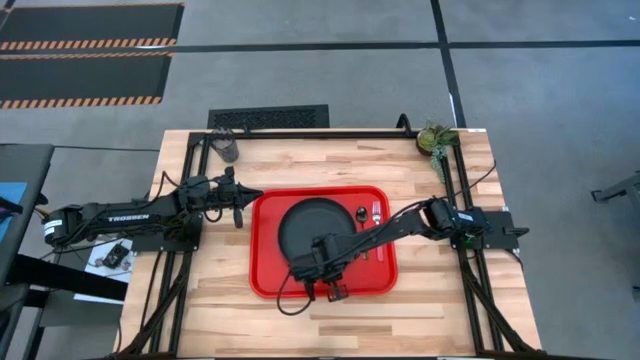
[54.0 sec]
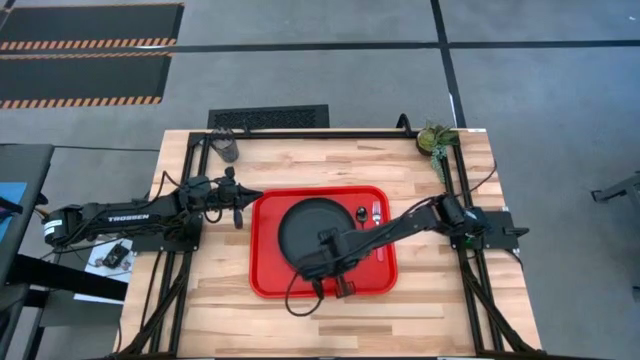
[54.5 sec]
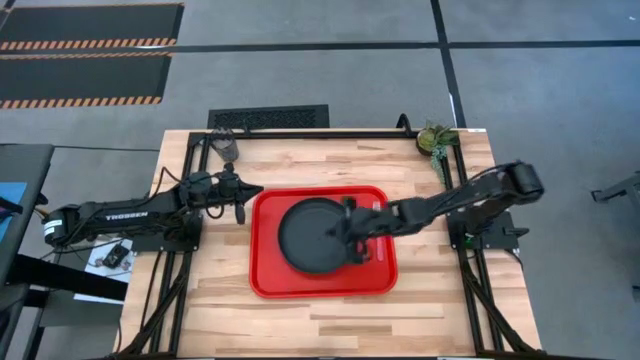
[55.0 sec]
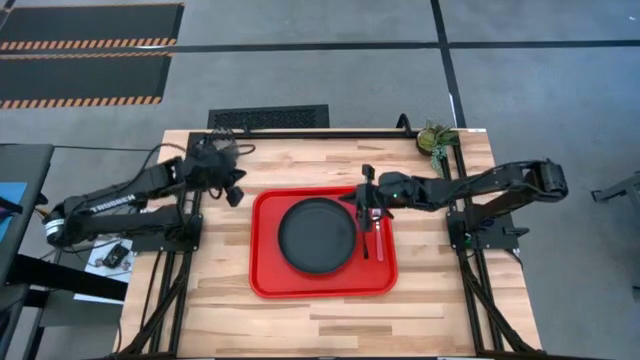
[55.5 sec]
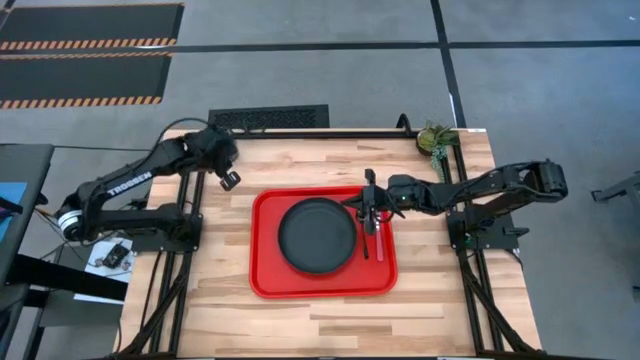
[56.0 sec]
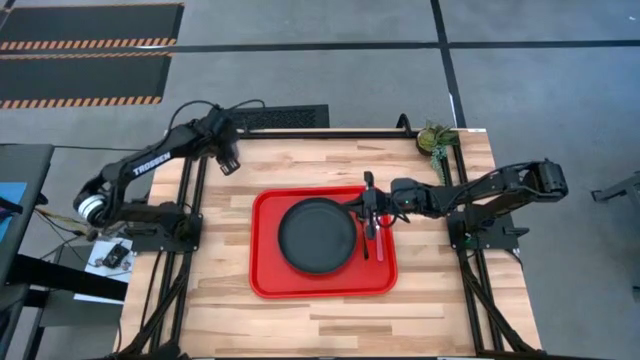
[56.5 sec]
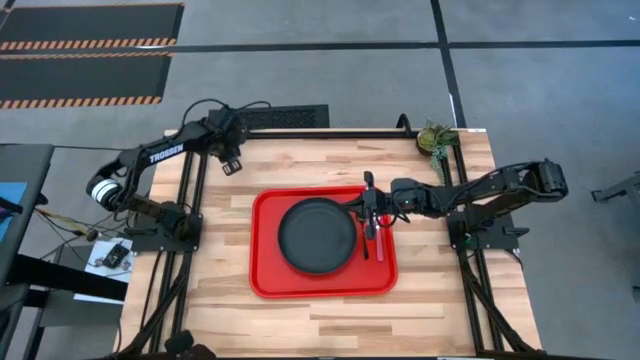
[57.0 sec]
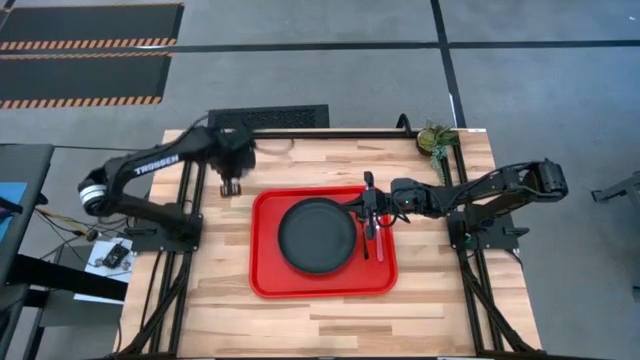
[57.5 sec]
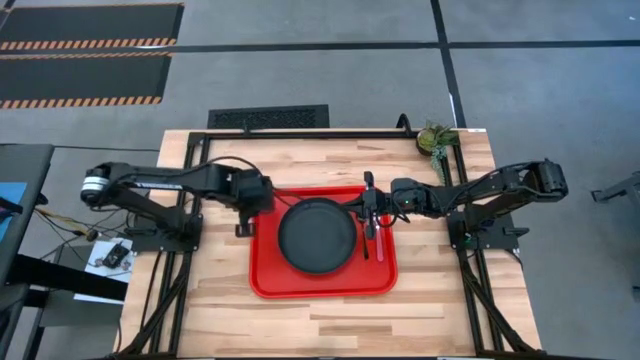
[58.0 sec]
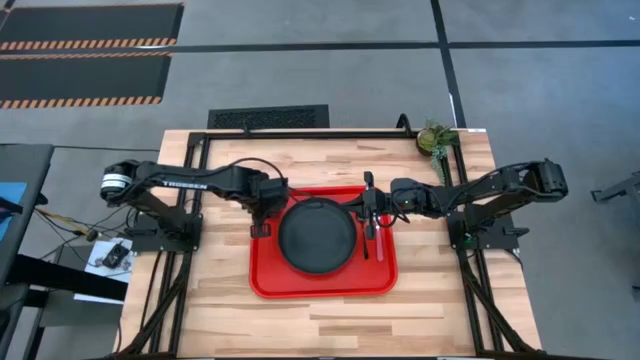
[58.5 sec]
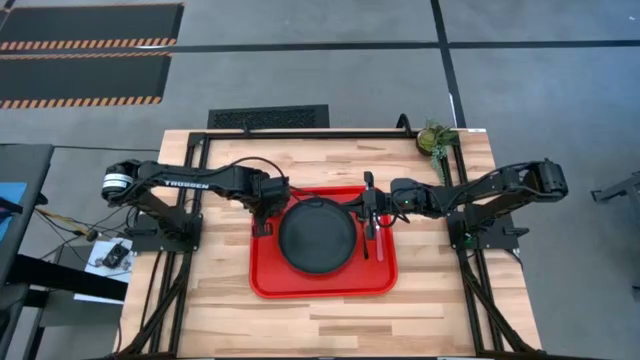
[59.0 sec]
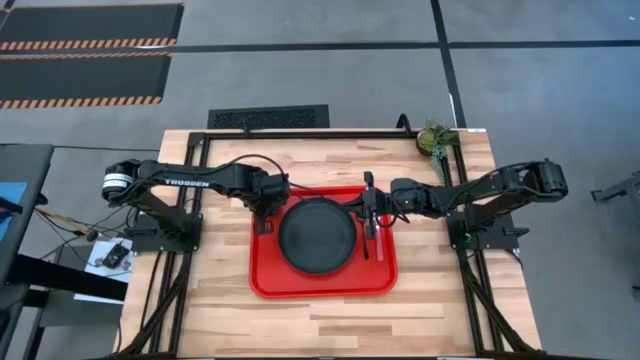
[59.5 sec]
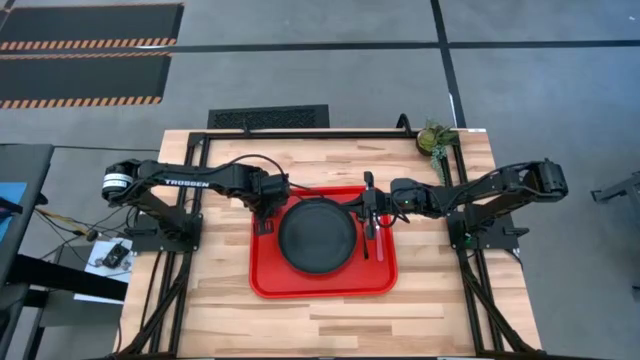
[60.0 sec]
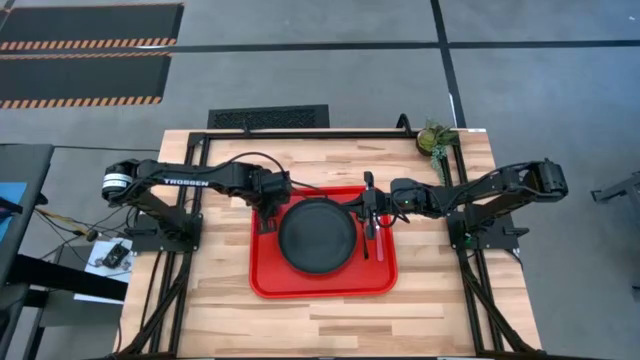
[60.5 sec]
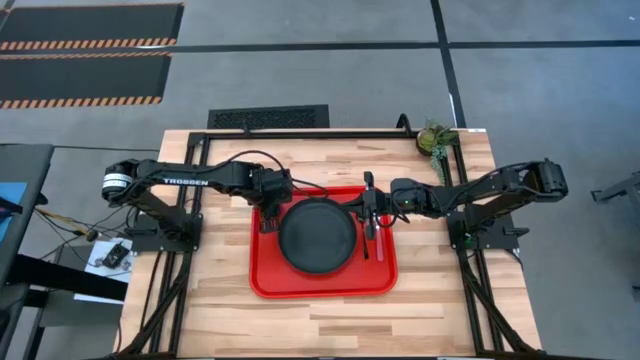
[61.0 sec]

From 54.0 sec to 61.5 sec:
Task: Pick and place plate/cup/fork/spoon on tray
Put the blue cup at the top left of the black plate on the red tray

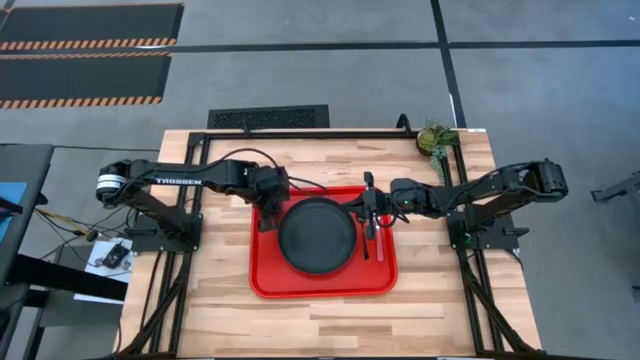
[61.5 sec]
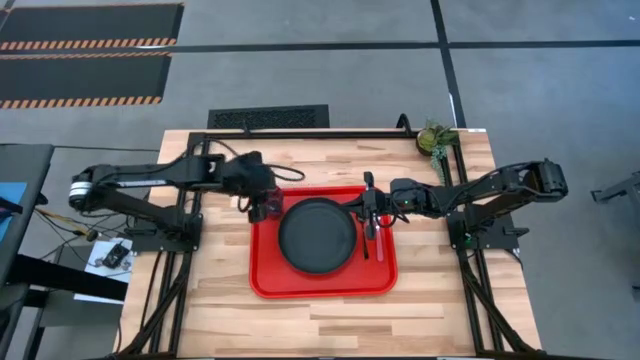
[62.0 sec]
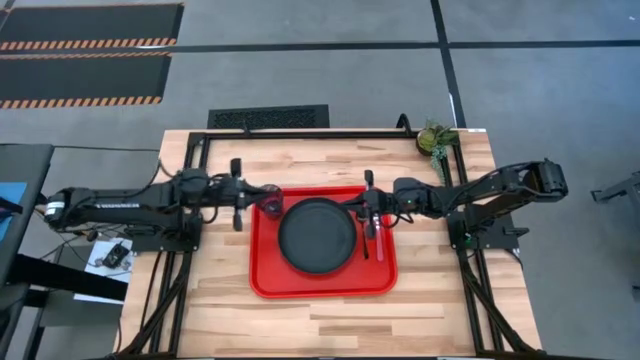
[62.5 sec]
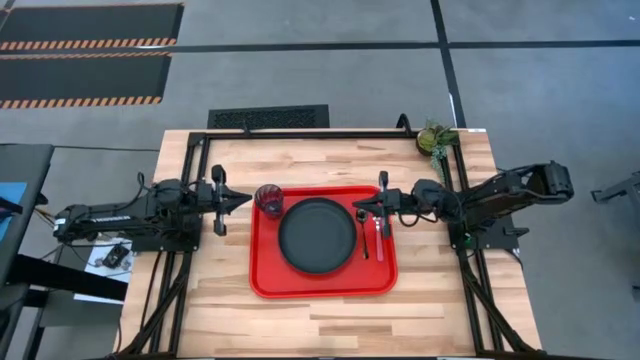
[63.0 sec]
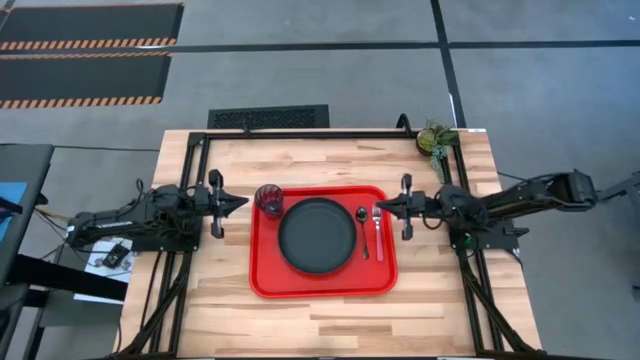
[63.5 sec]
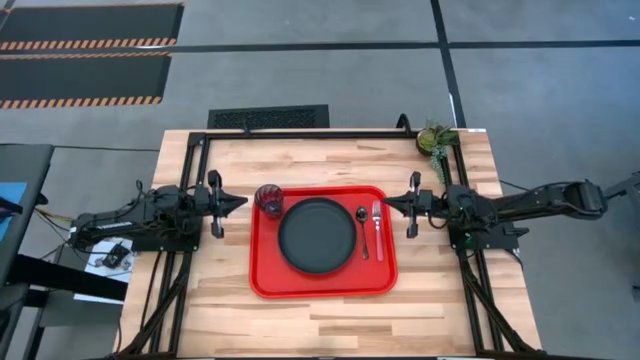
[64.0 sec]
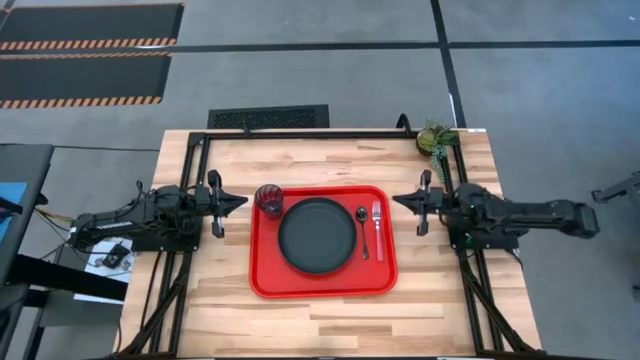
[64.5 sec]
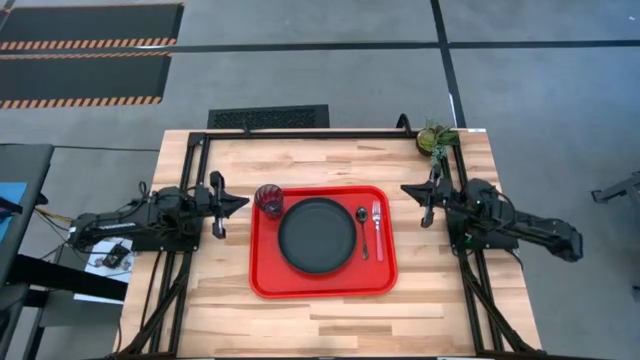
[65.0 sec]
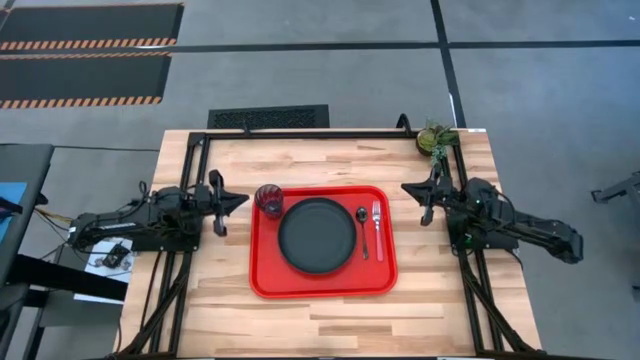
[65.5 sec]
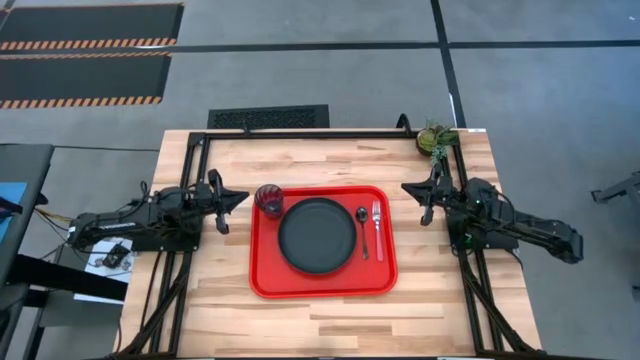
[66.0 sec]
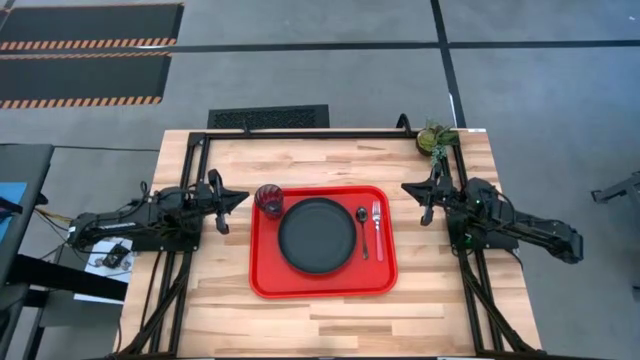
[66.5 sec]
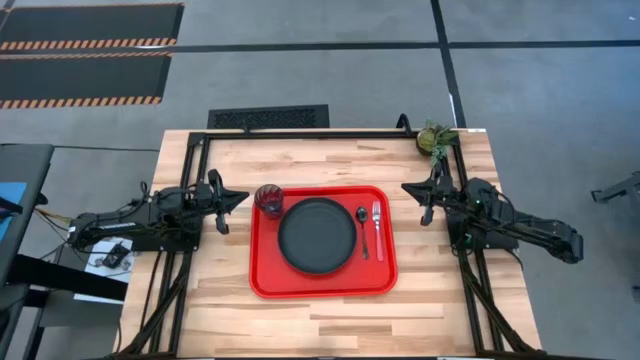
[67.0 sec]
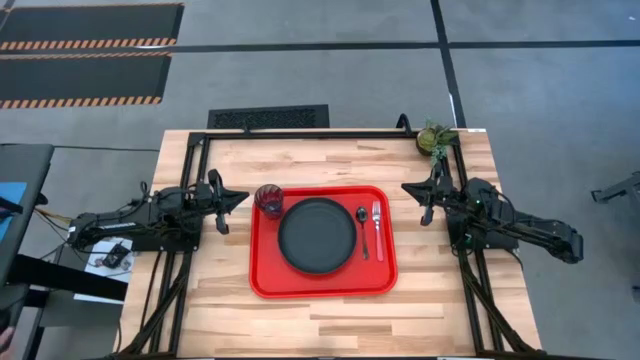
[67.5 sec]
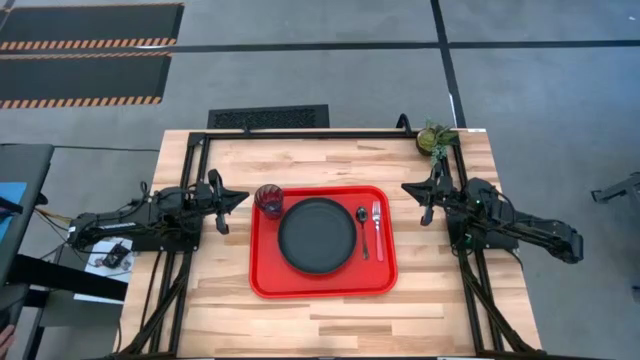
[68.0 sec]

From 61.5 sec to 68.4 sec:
Return to Home Position

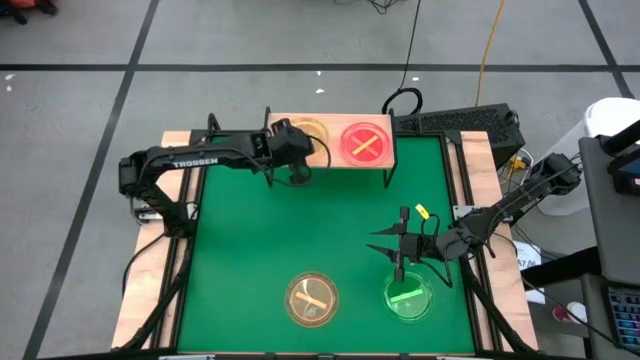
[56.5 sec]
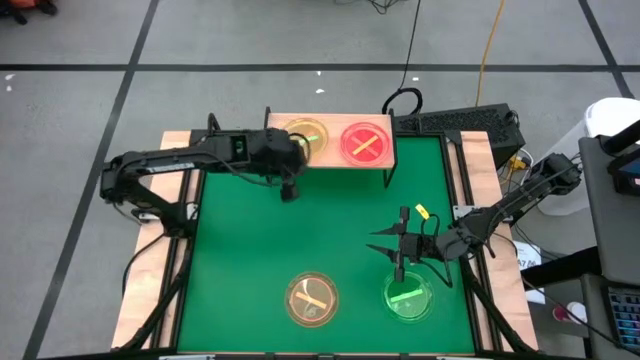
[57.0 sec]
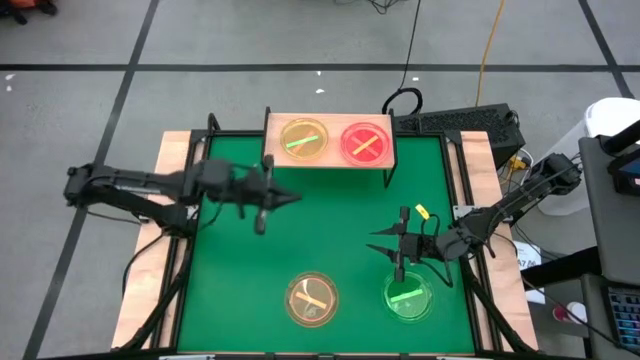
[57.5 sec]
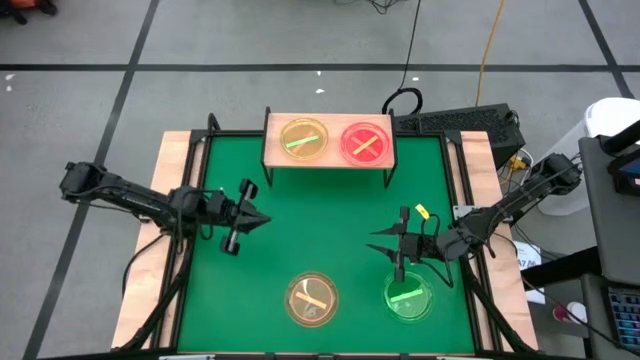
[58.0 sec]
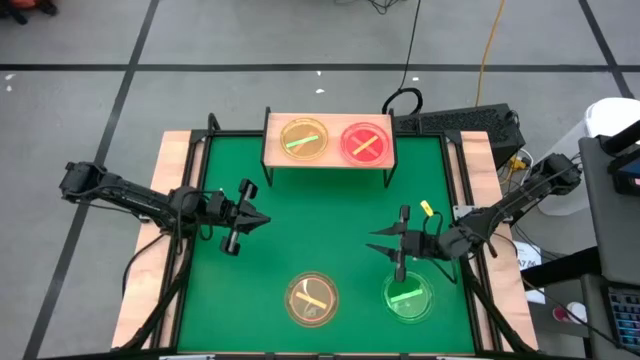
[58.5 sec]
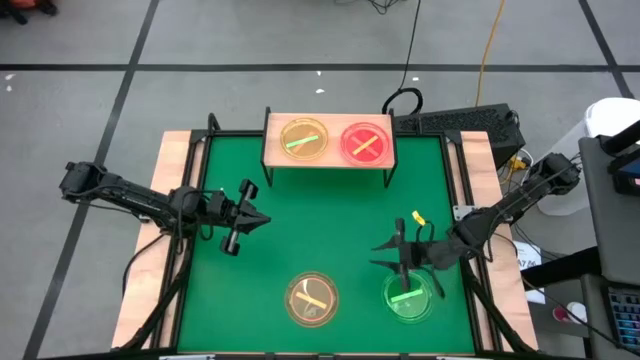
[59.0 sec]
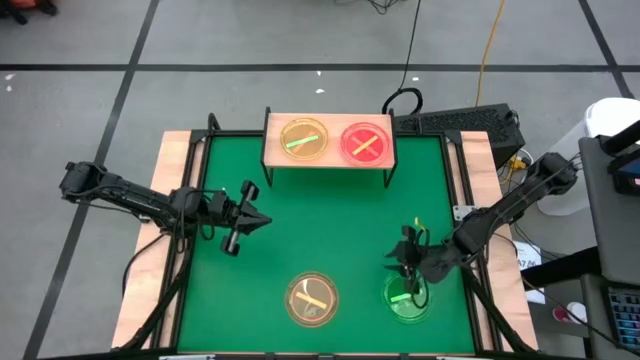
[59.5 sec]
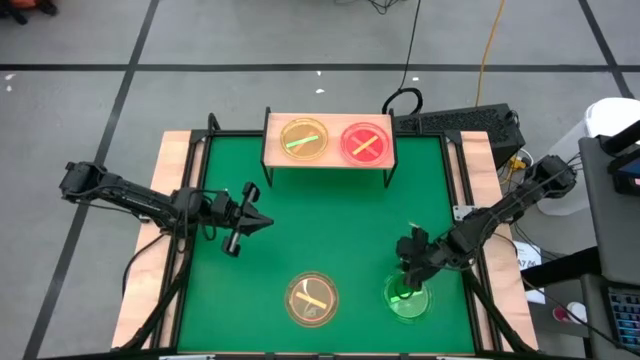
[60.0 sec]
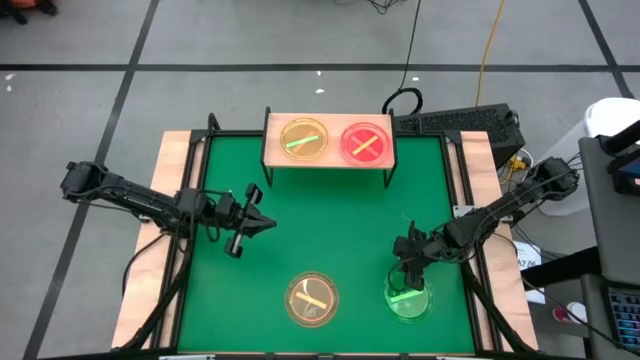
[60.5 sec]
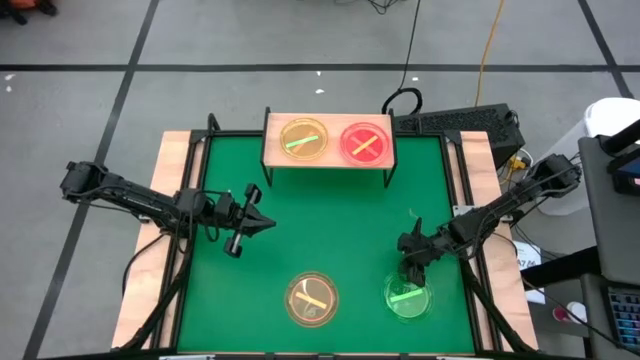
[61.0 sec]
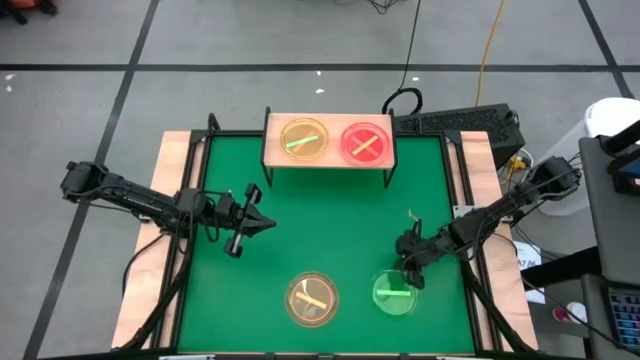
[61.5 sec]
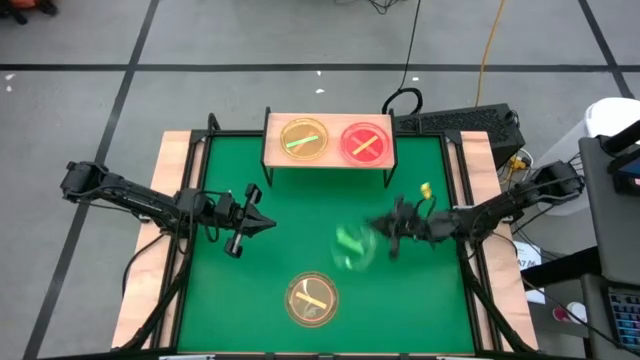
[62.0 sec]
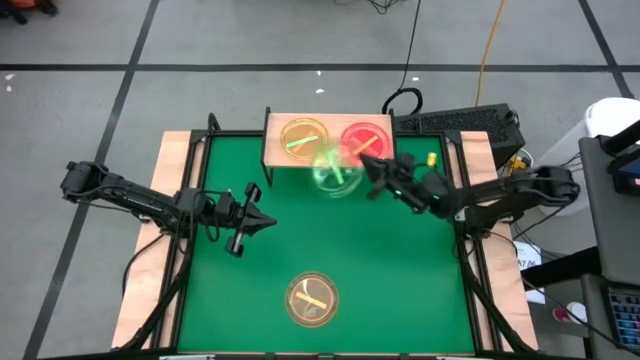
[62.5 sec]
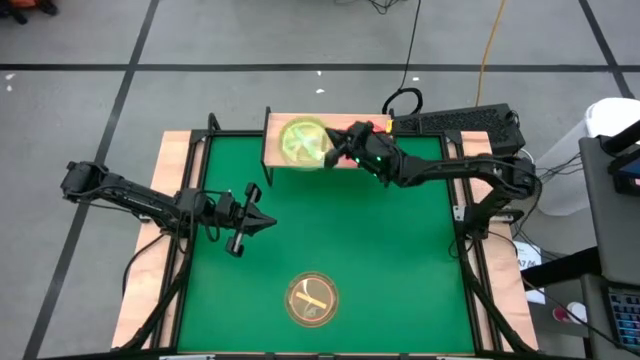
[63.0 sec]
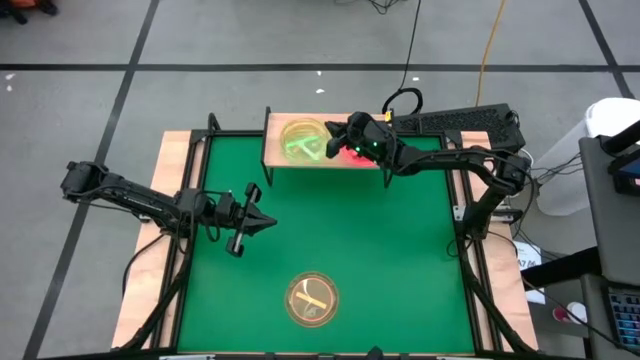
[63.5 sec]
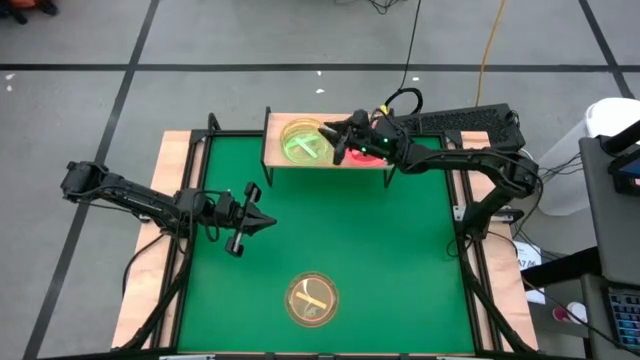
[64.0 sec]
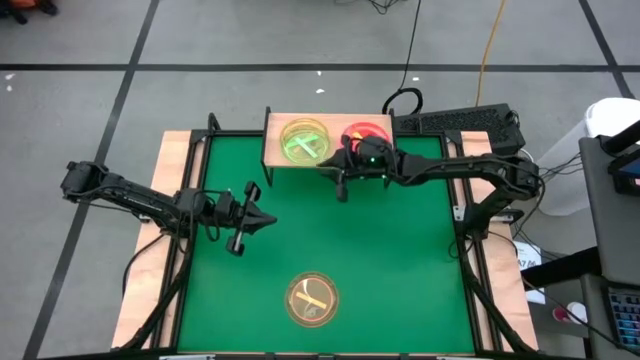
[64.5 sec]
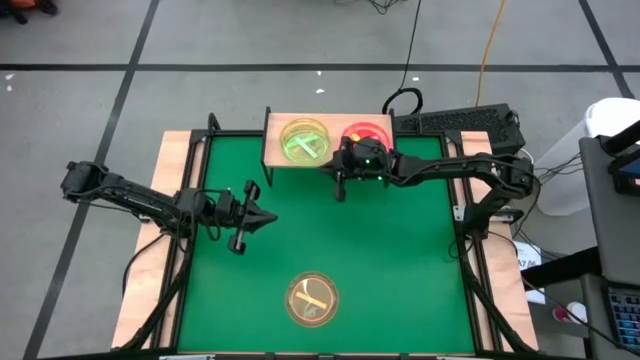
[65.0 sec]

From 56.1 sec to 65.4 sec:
Task: Place and stack plates onto a shelf
Stack the green plate on top of the green plate on the shelf
